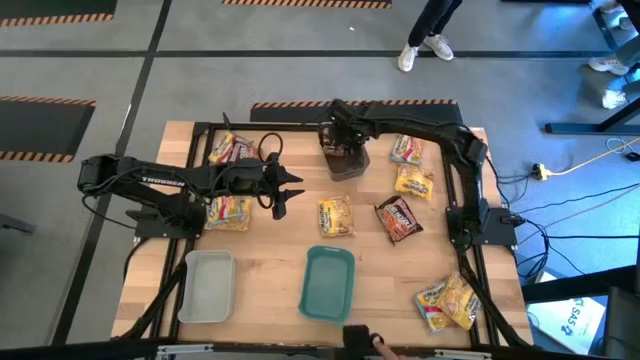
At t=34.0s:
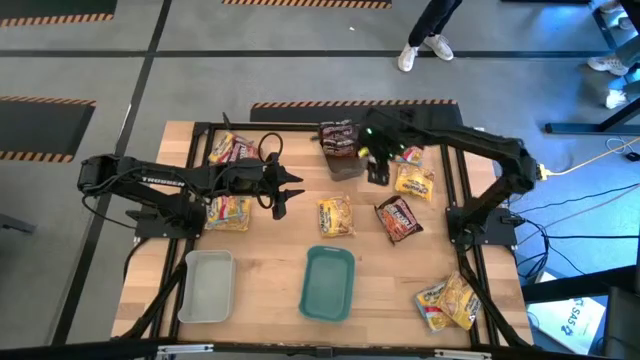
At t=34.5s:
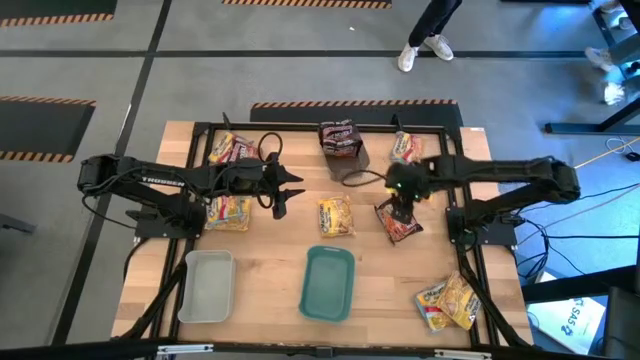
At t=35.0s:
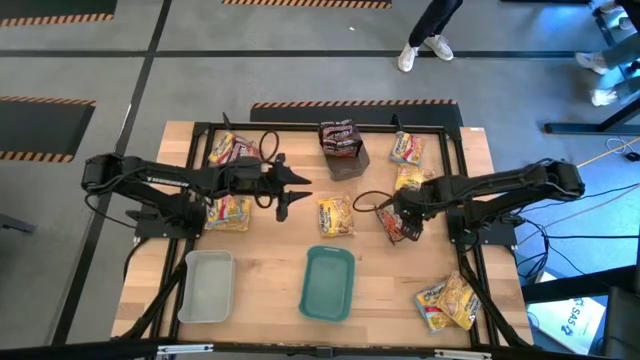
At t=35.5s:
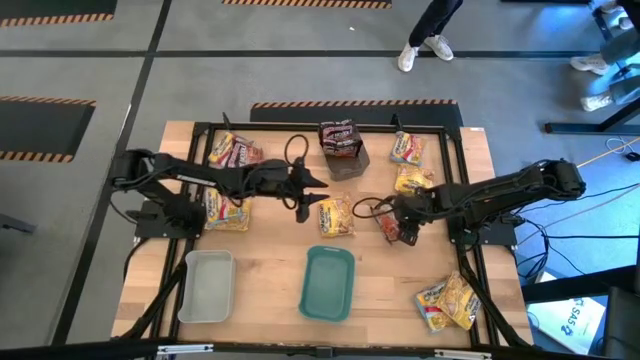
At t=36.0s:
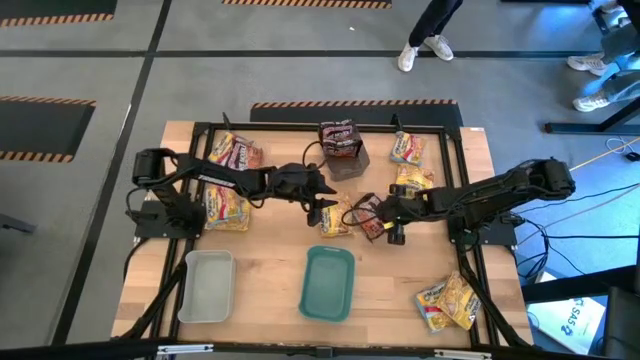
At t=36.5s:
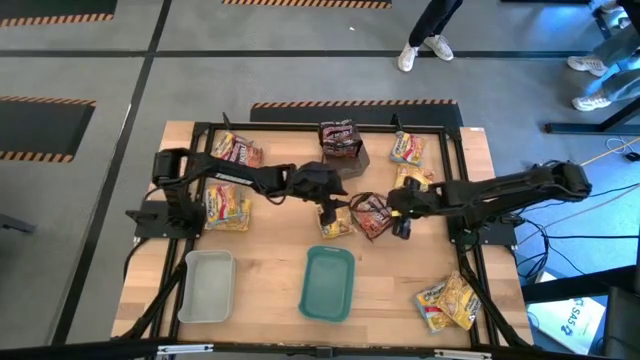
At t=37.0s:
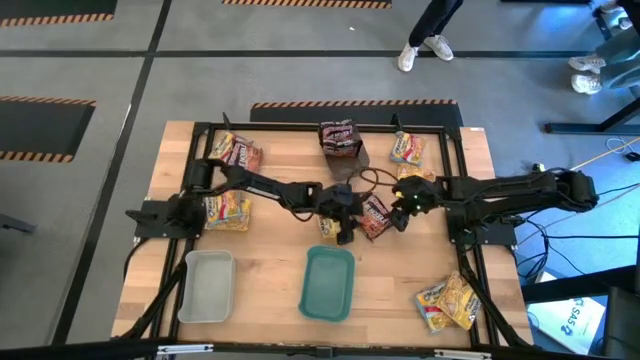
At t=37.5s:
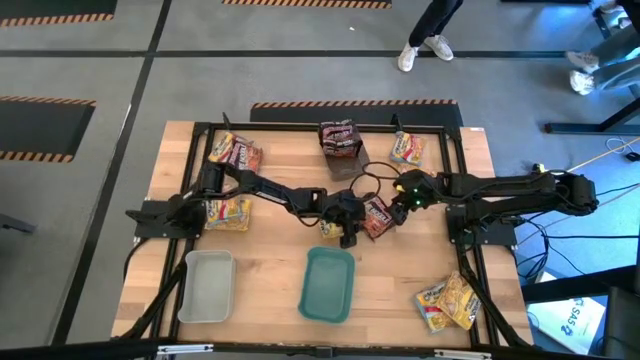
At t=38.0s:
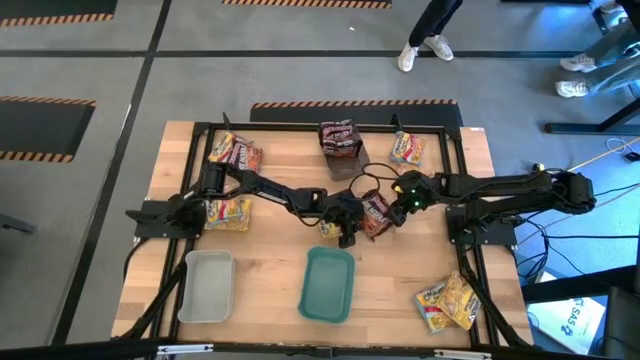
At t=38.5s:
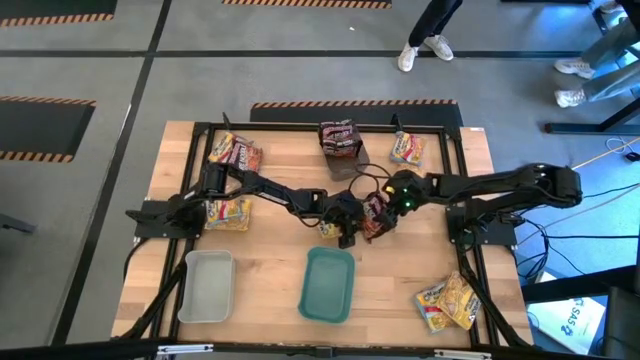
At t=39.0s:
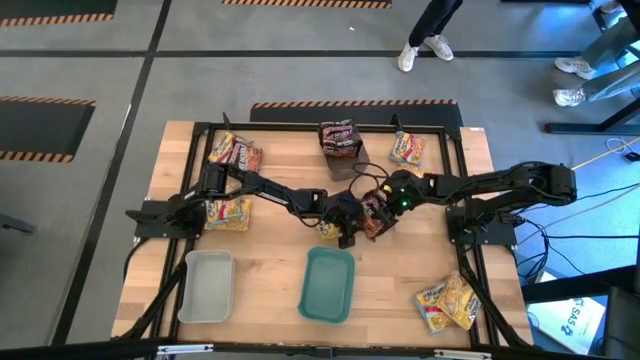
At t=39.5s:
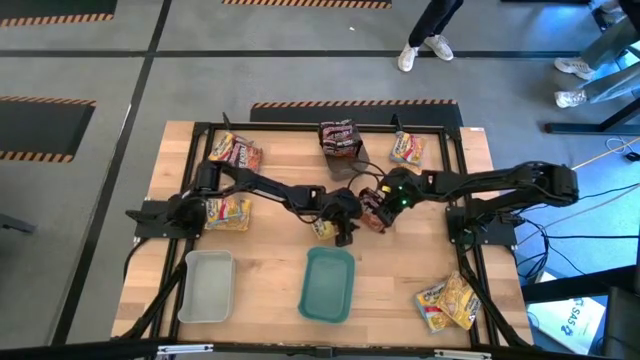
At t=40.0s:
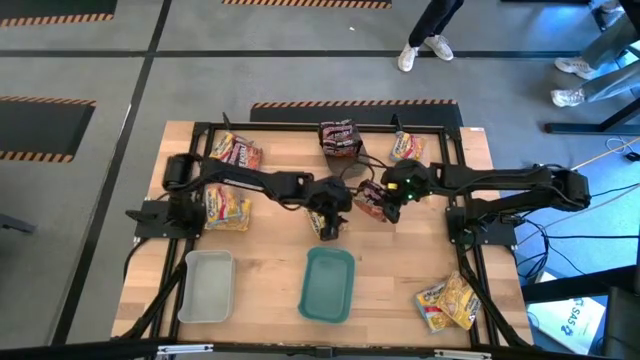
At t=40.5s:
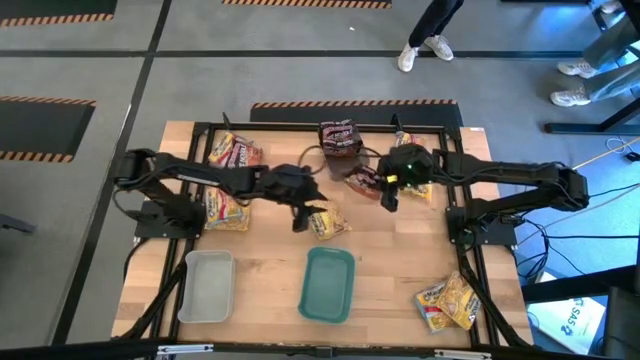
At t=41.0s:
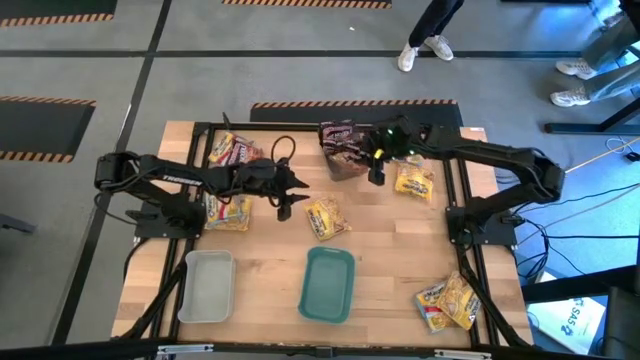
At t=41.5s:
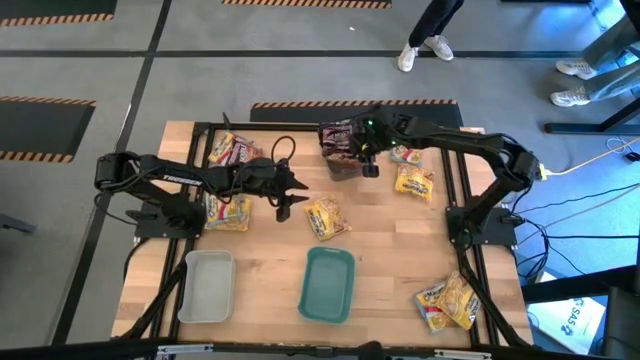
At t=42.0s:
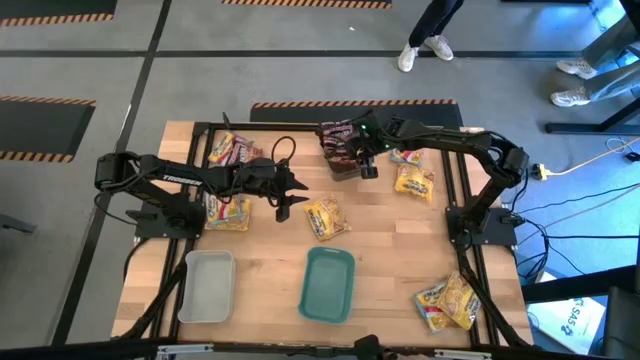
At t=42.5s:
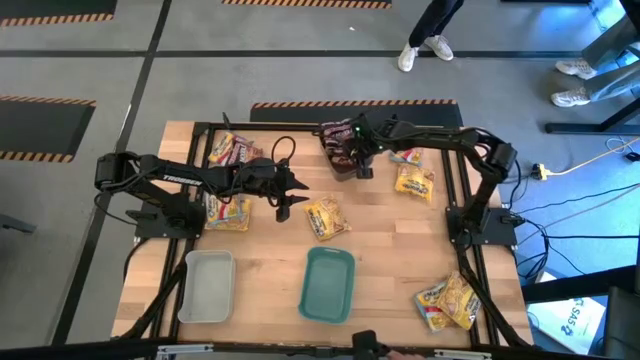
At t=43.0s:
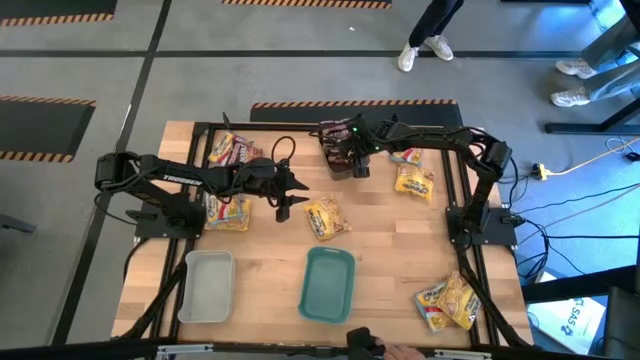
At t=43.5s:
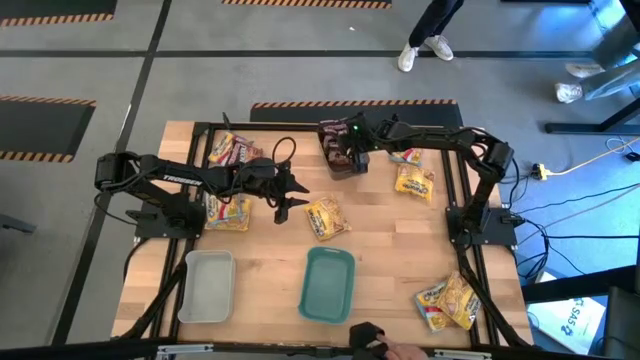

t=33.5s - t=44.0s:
Task: Sort Maruchan noodles
Put the black noodle pack into the black bin

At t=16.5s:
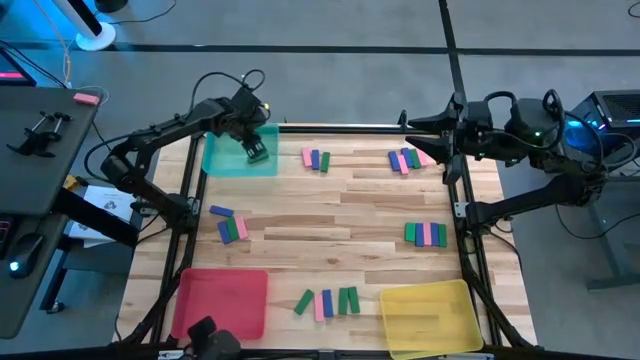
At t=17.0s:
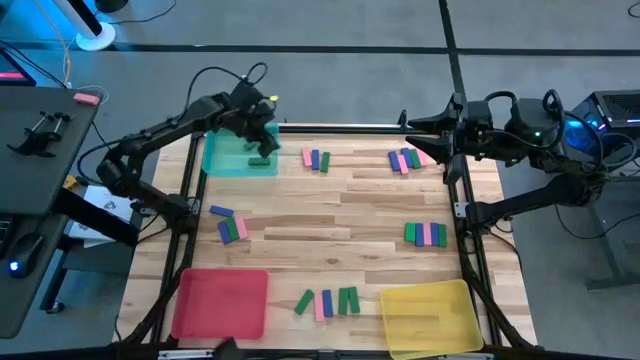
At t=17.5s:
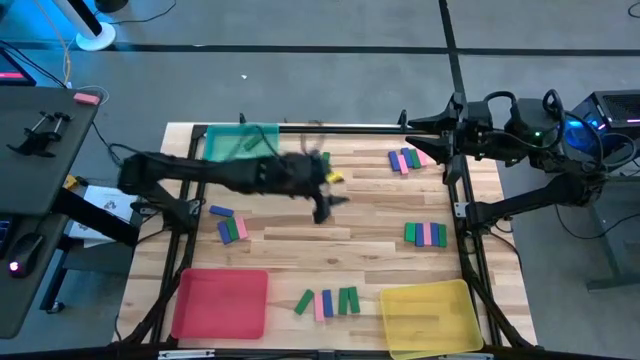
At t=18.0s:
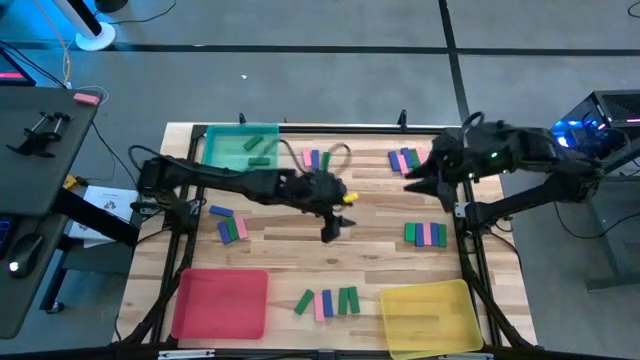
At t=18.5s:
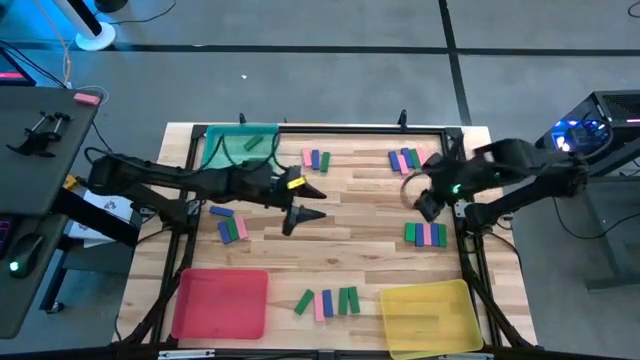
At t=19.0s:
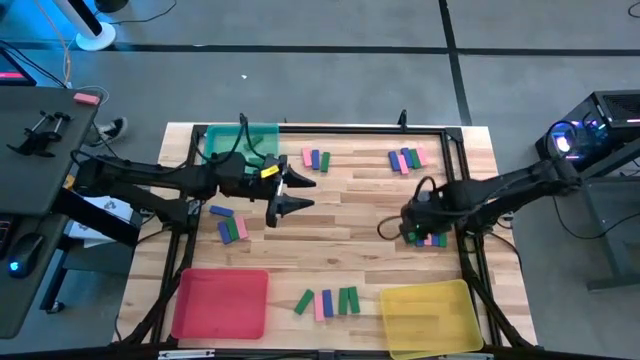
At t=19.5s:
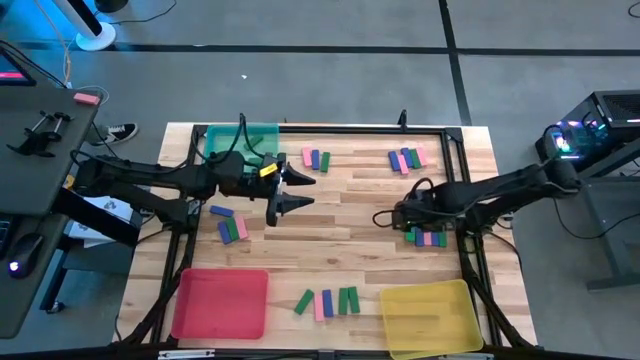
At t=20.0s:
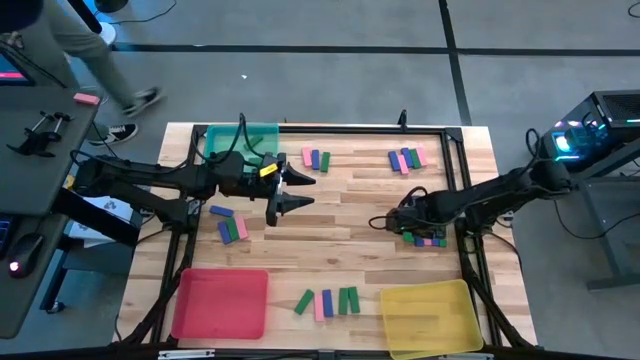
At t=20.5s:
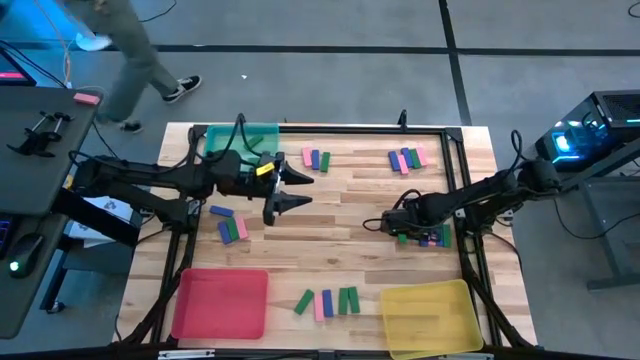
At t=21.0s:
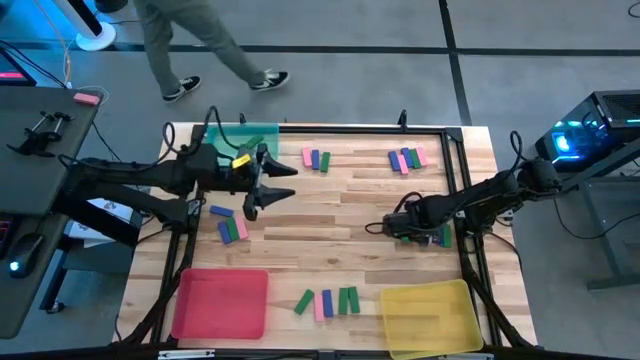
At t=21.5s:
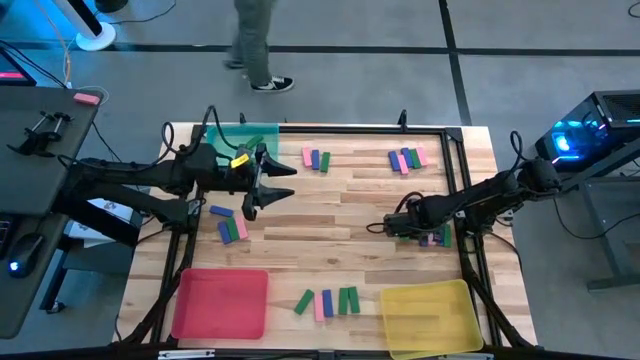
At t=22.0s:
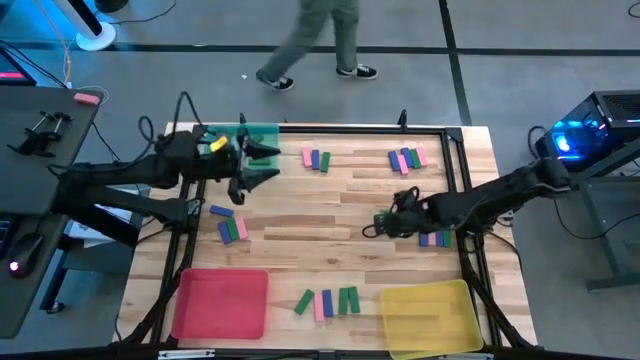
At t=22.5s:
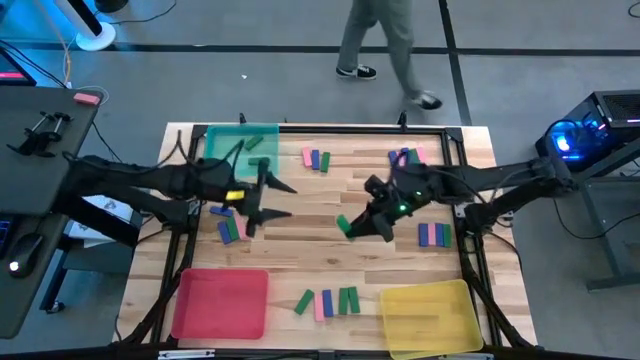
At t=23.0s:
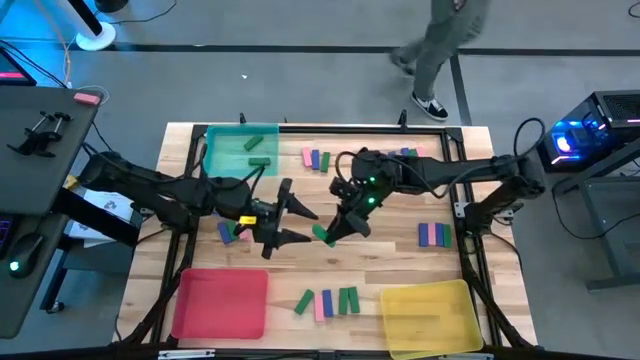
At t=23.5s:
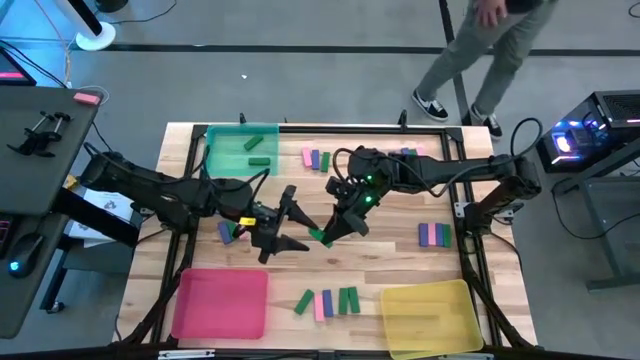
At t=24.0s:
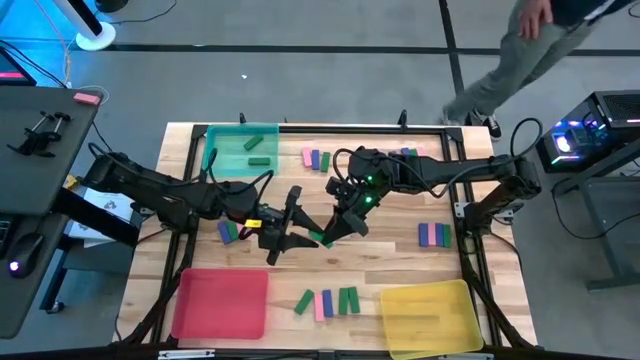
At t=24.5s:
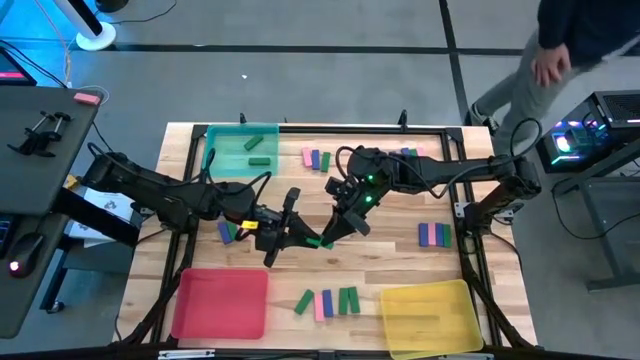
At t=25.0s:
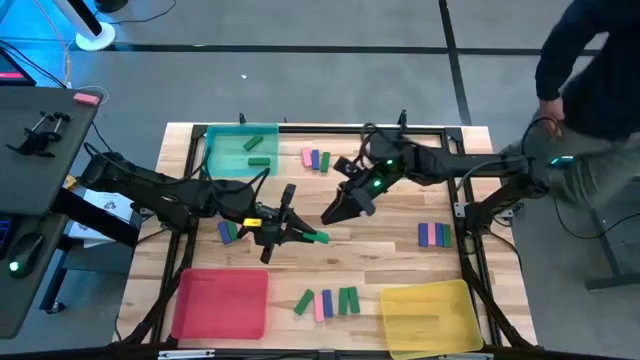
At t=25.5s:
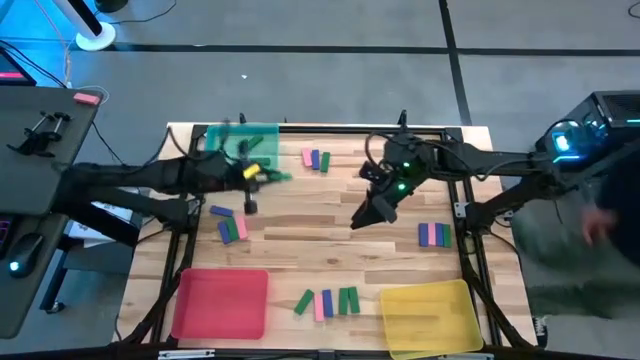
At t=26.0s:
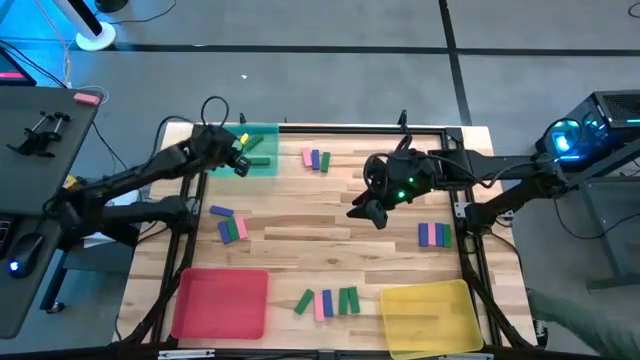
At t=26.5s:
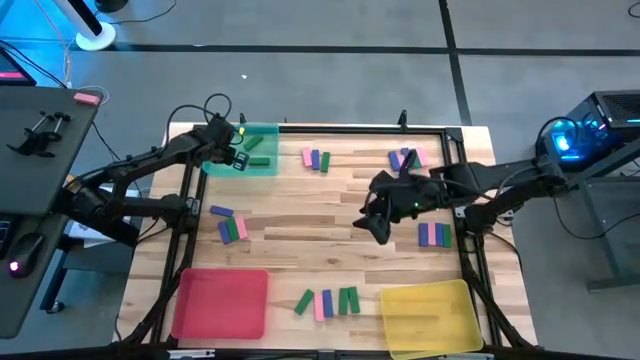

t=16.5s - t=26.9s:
Task: Sort blocks
Put the green block into the blue bin
